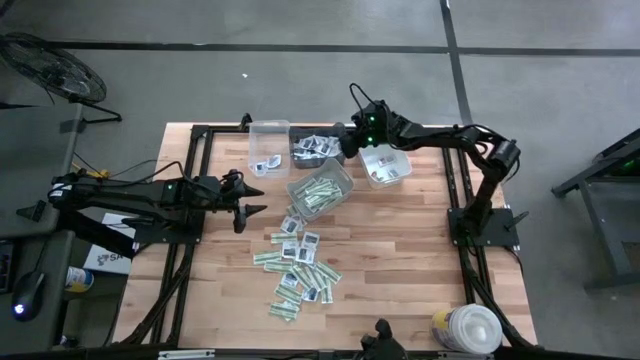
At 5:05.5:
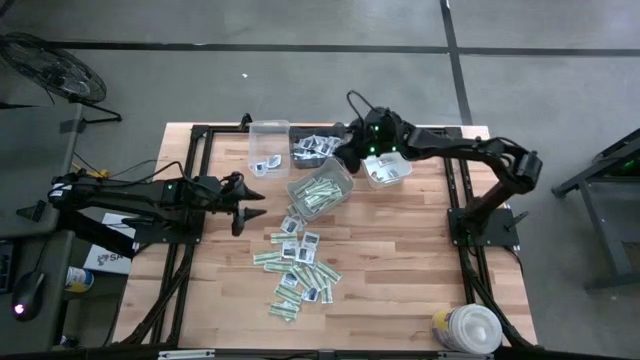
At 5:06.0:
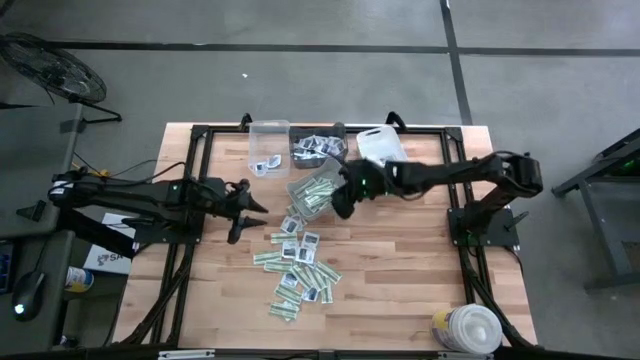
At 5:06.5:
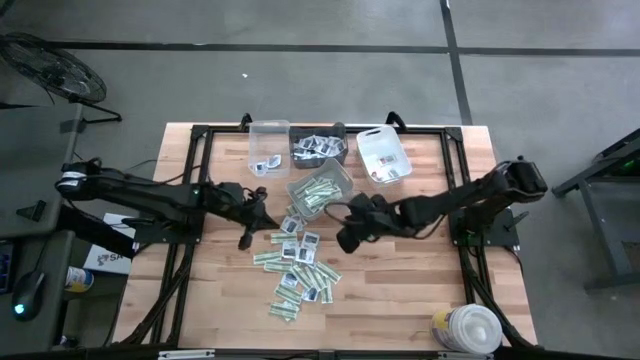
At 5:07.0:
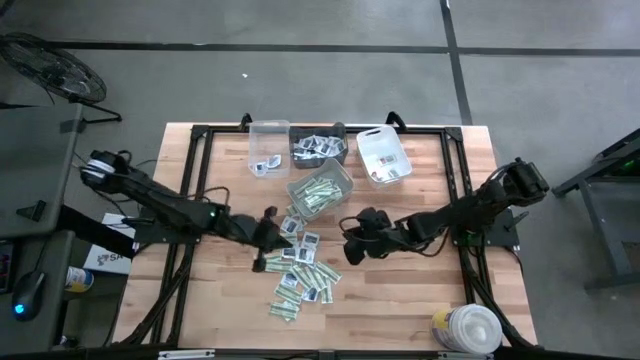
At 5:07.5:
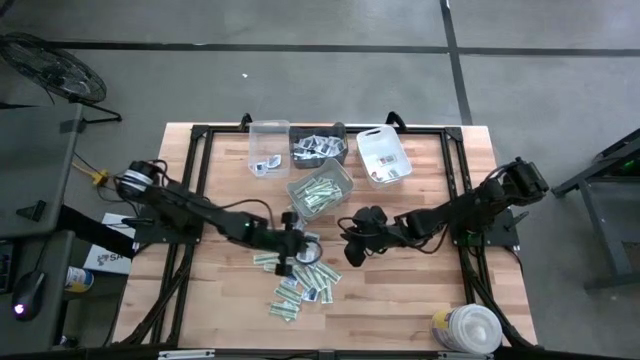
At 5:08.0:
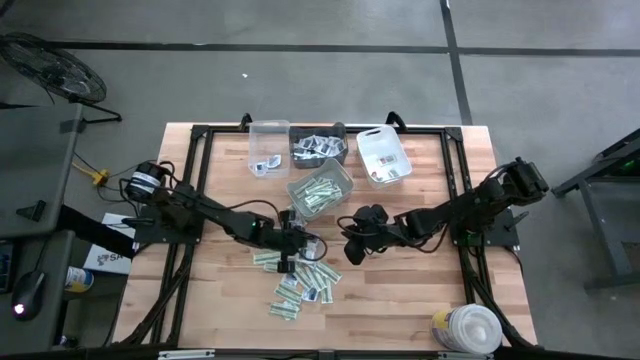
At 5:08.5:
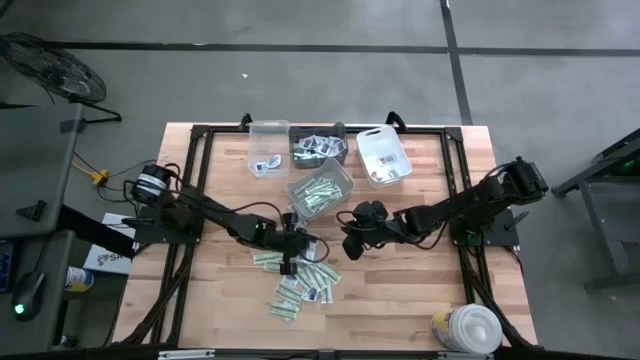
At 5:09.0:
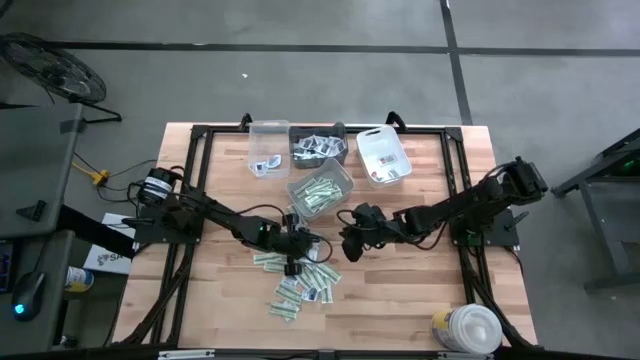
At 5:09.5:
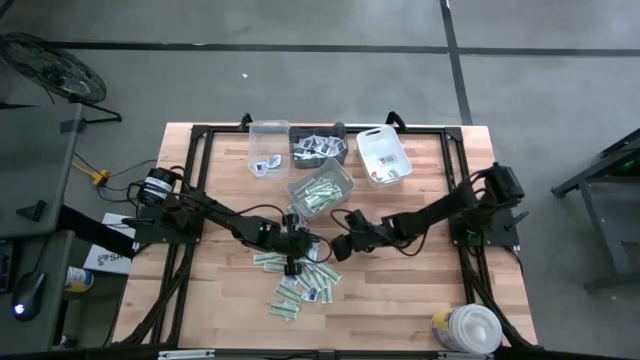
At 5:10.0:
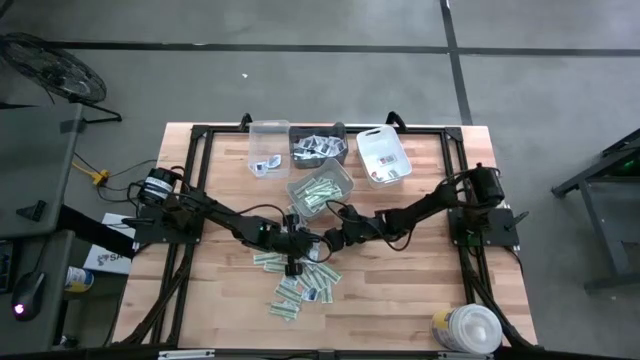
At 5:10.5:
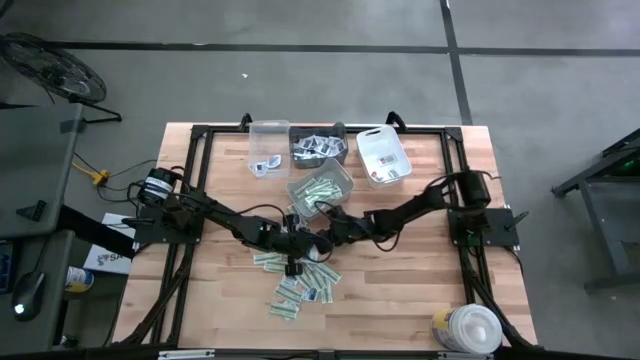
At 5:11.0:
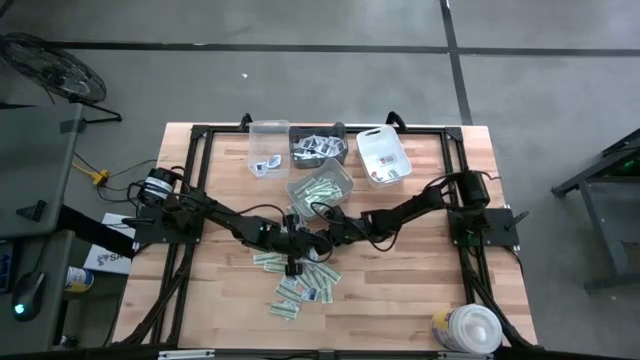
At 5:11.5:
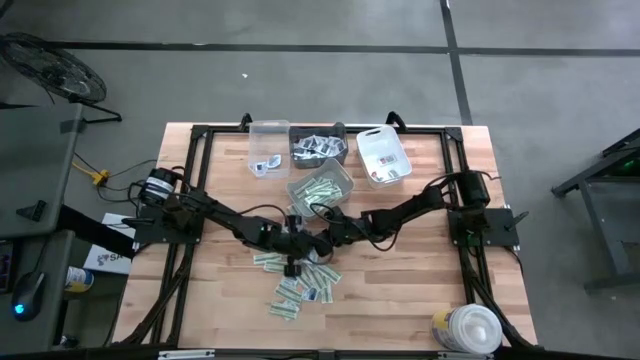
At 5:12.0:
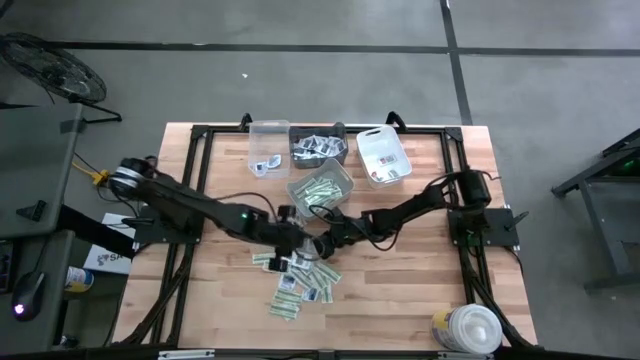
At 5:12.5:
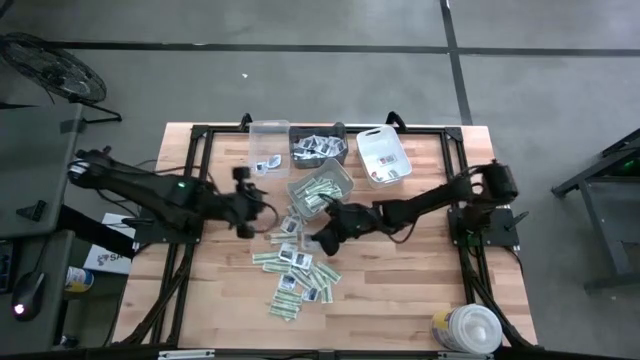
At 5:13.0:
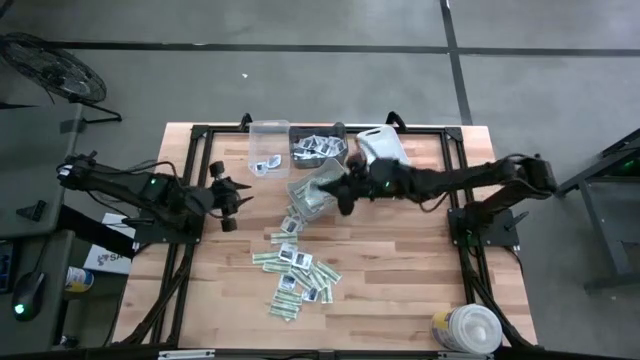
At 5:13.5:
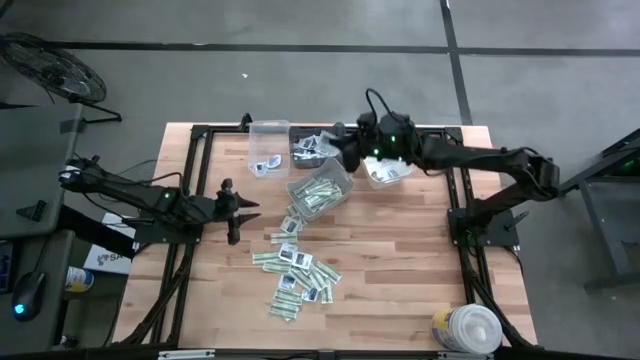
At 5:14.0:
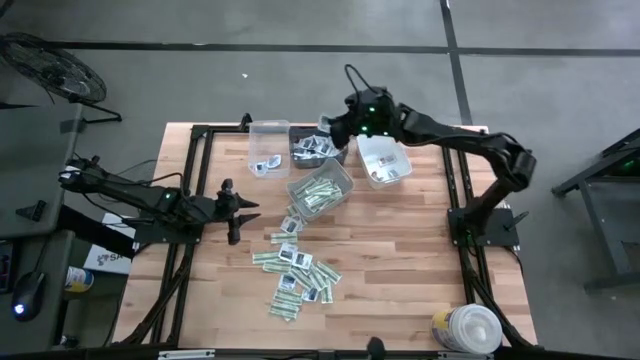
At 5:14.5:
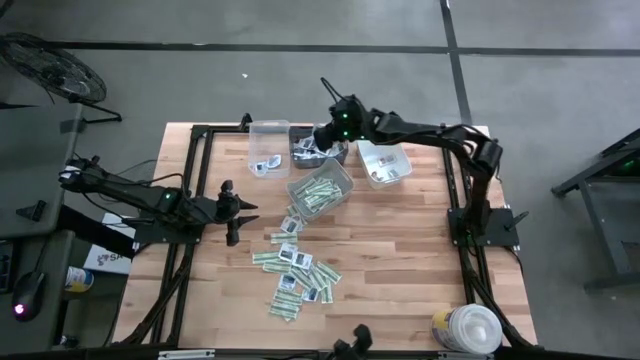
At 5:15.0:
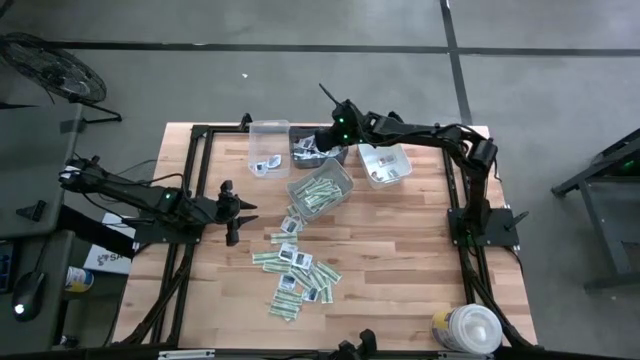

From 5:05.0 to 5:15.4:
Task: Pick & Place First Aid Supplies
Put the towelette pack into the black bin

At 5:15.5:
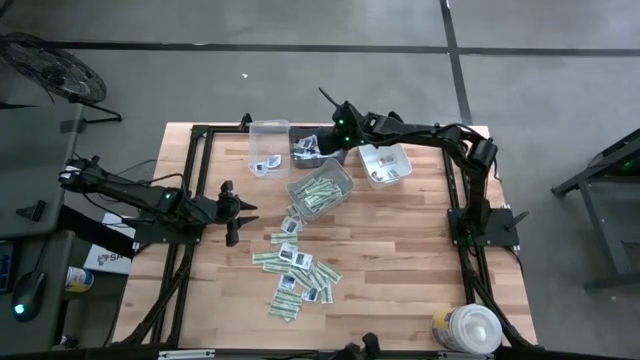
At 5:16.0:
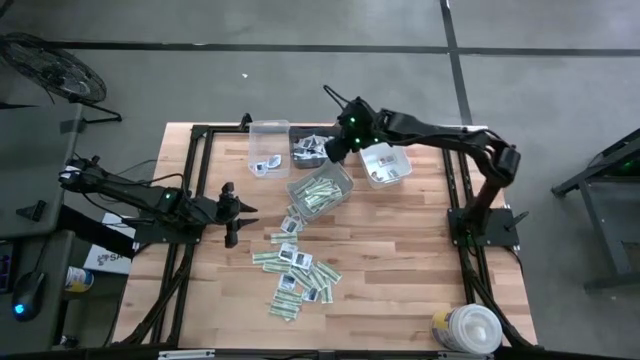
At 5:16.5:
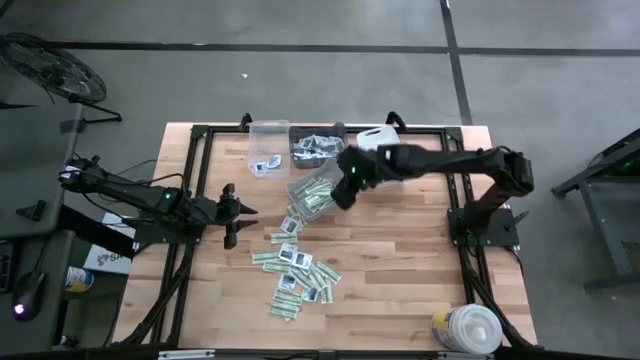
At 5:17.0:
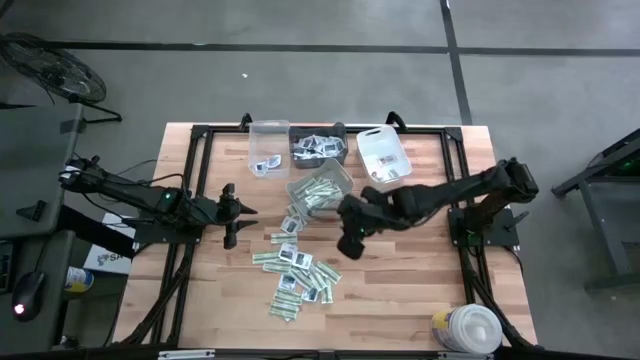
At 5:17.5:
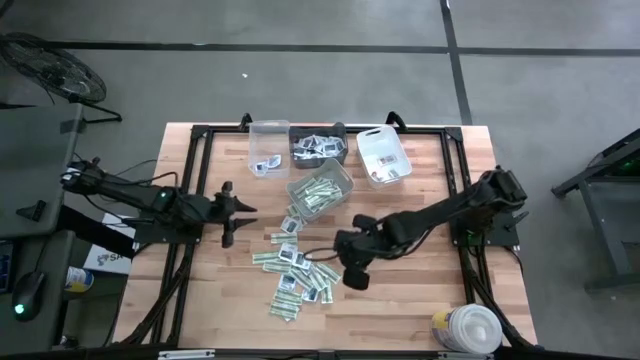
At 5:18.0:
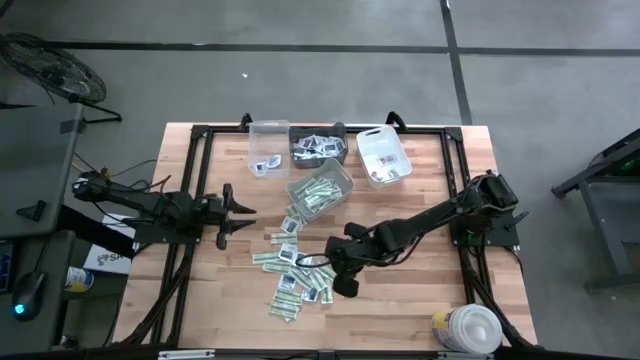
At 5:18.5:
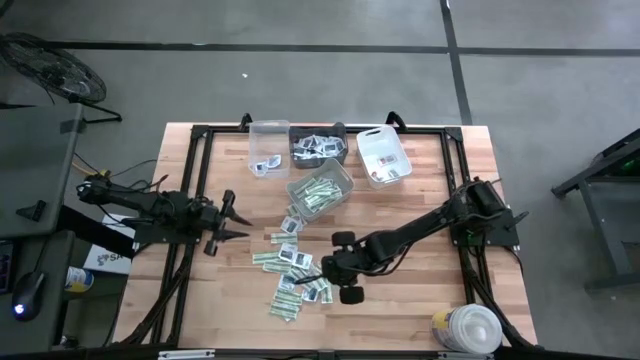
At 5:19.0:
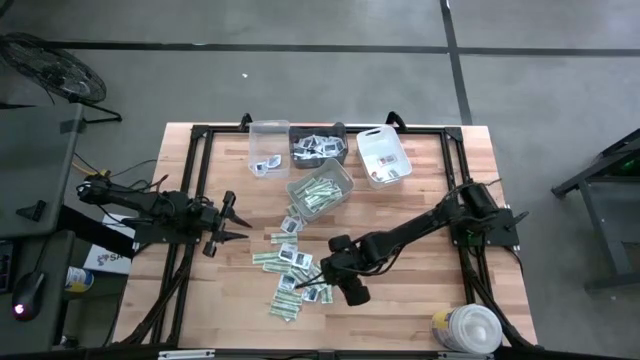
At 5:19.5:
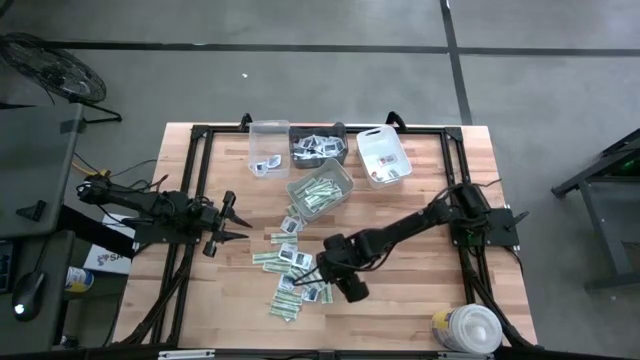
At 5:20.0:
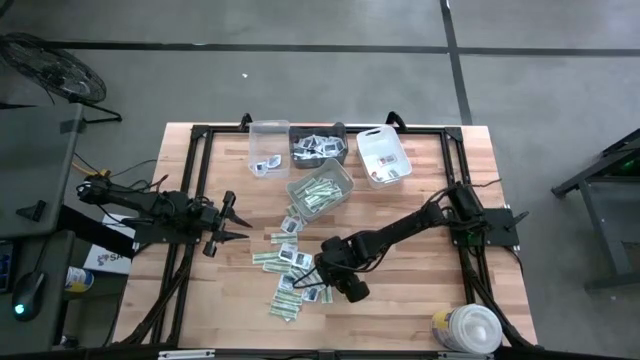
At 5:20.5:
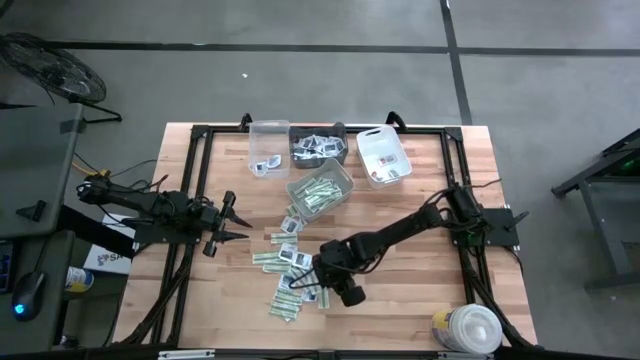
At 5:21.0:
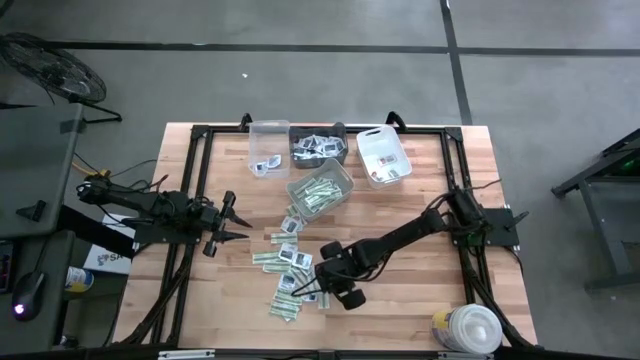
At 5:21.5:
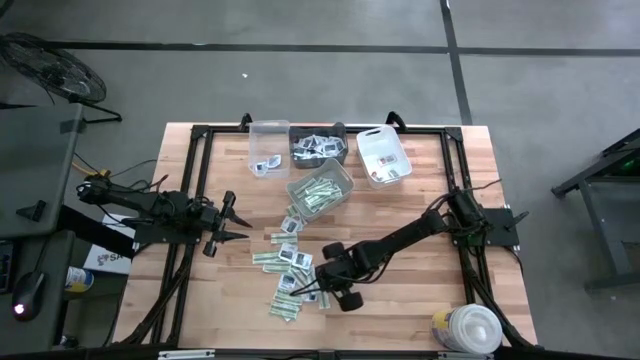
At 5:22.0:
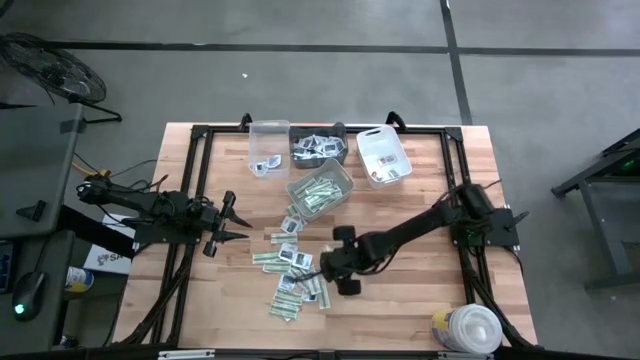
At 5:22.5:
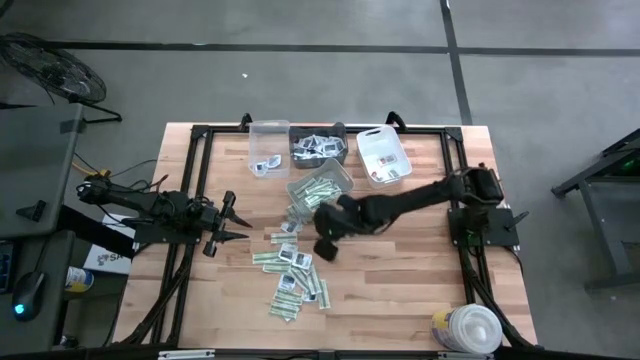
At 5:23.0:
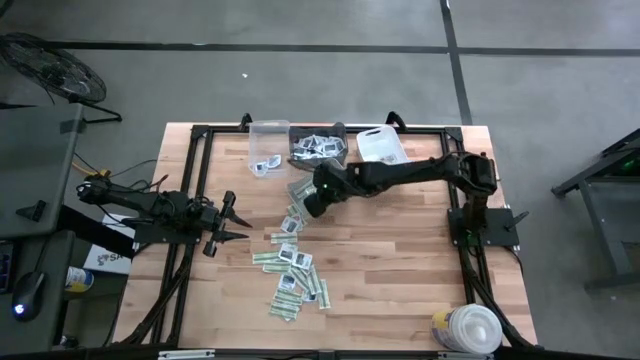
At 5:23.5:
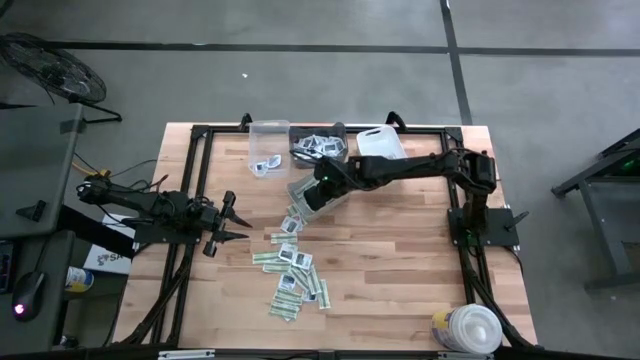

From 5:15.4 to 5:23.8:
Put the bandage pack into the gray bin

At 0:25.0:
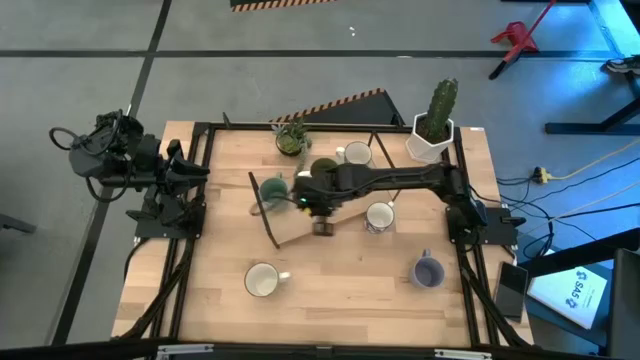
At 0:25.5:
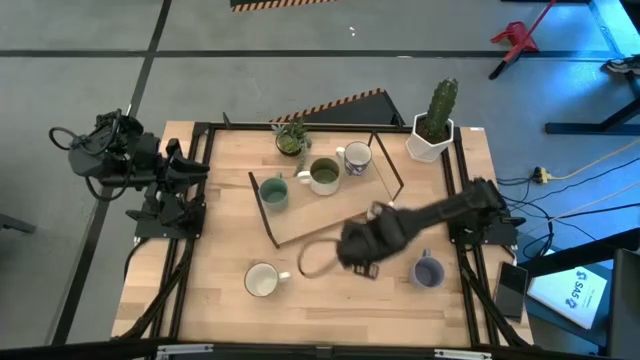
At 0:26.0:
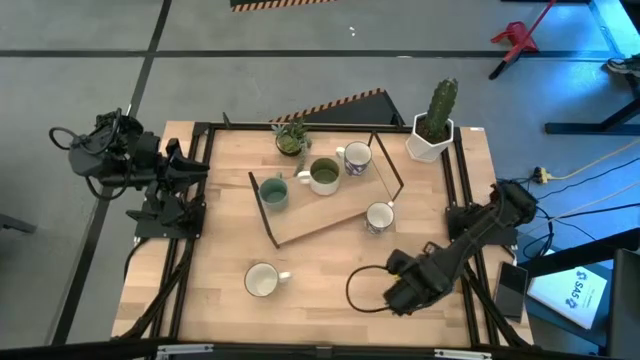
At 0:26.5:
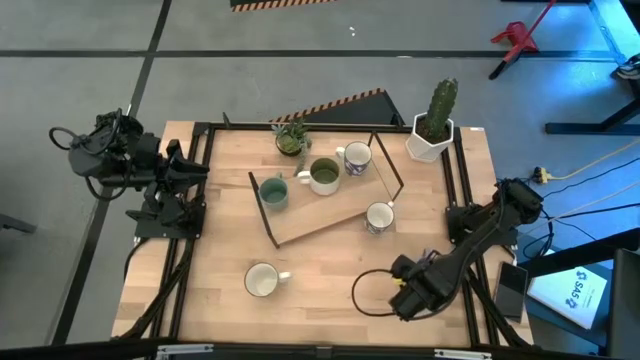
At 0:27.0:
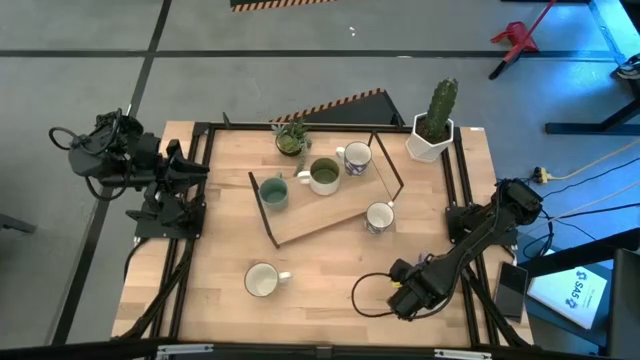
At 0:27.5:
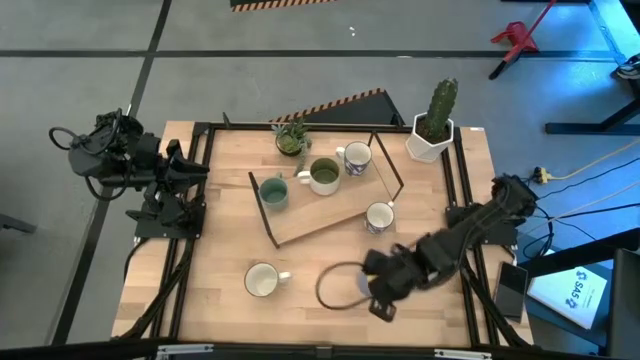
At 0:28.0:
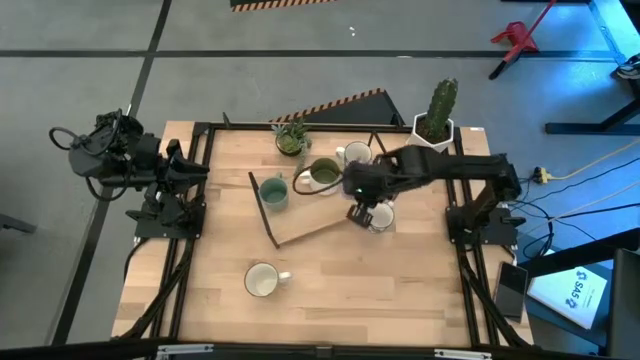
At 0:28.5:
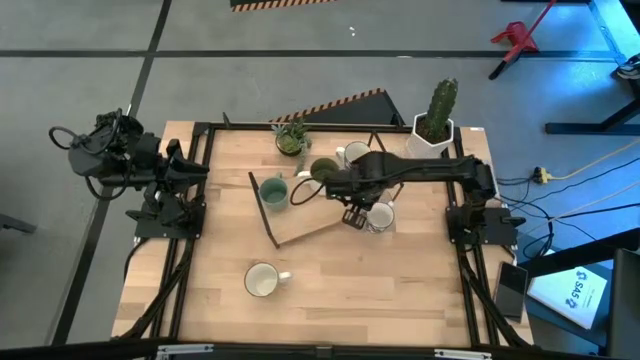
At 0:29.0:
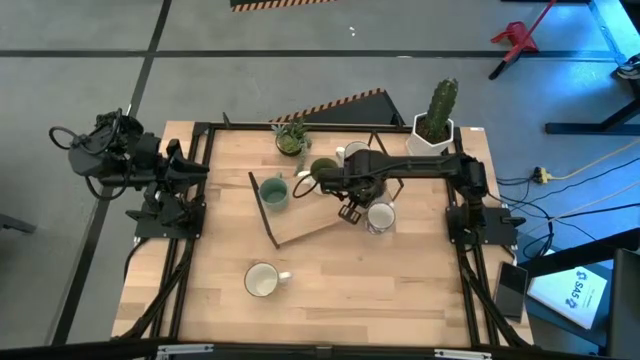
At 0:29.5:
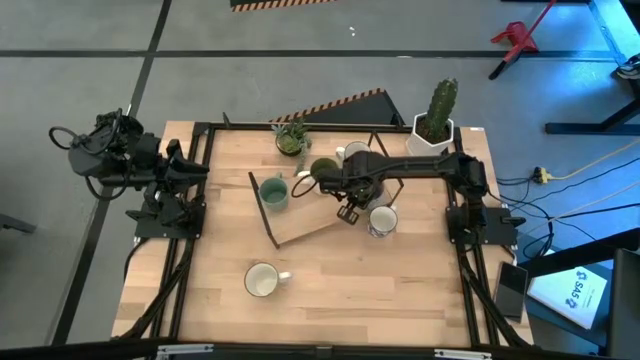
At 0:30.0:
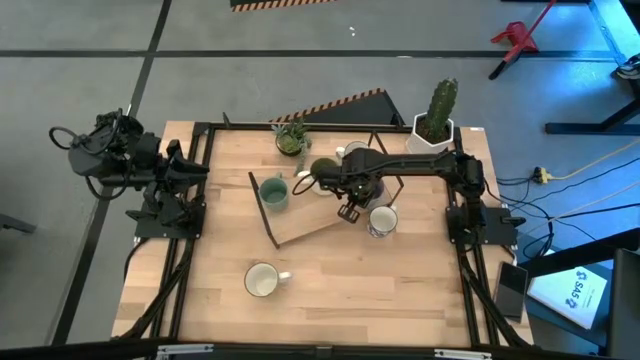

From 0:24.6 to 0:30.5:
Task: Place coffee mugs
Put the purple mug on the shelf
